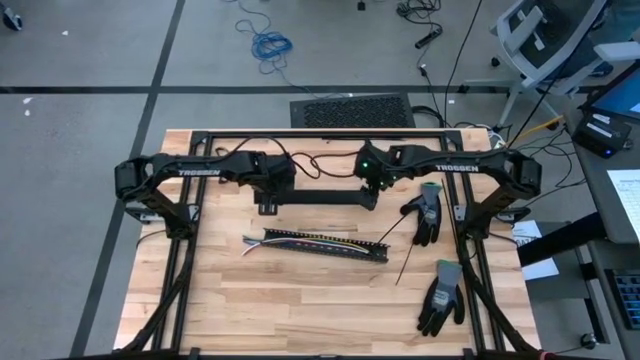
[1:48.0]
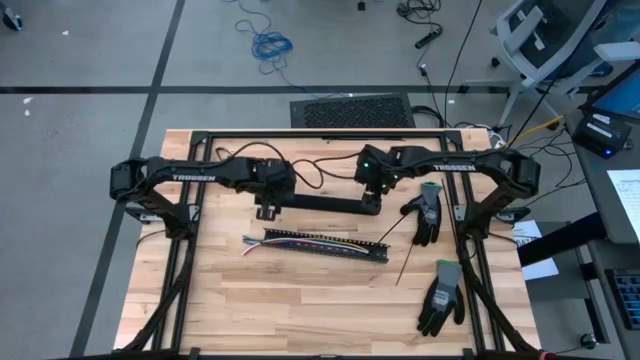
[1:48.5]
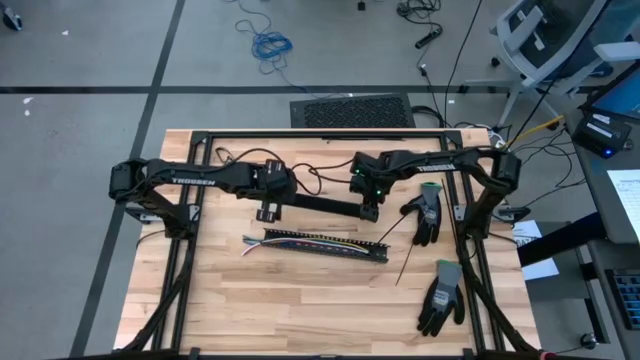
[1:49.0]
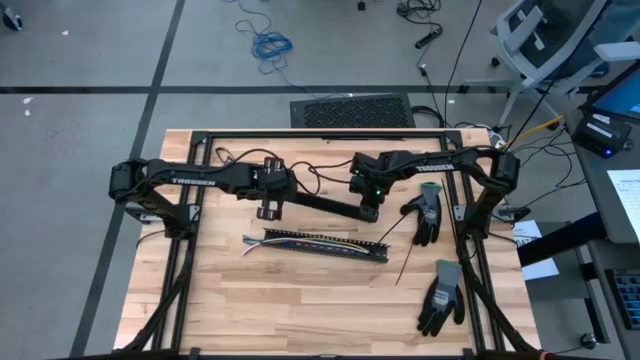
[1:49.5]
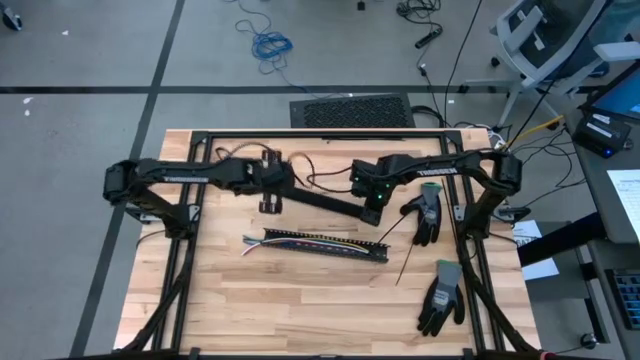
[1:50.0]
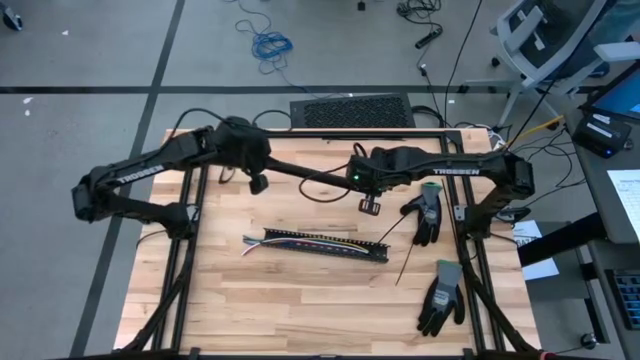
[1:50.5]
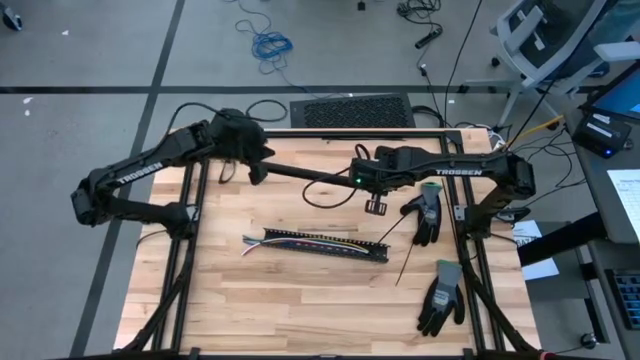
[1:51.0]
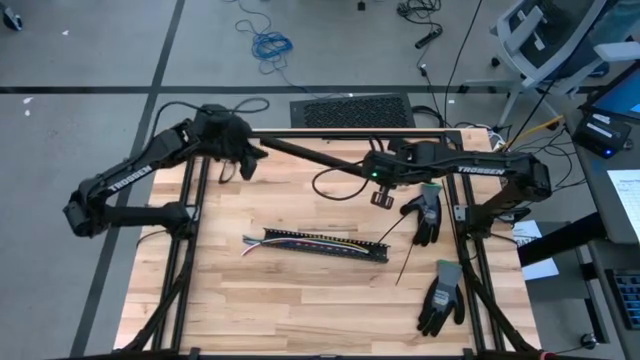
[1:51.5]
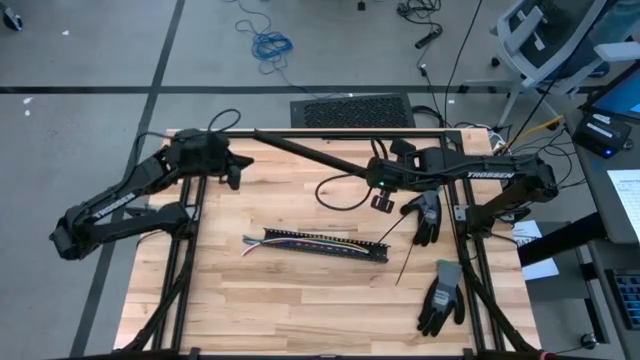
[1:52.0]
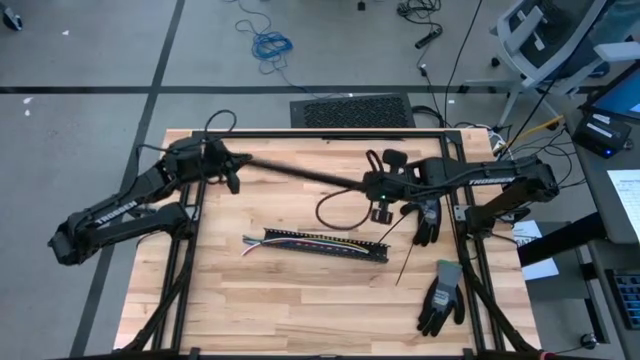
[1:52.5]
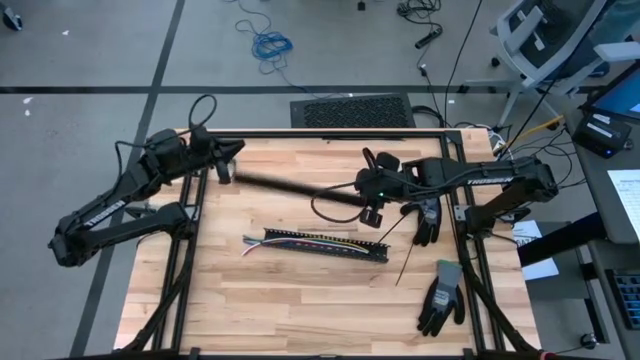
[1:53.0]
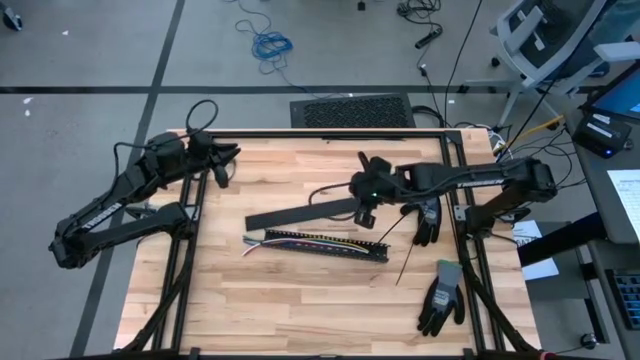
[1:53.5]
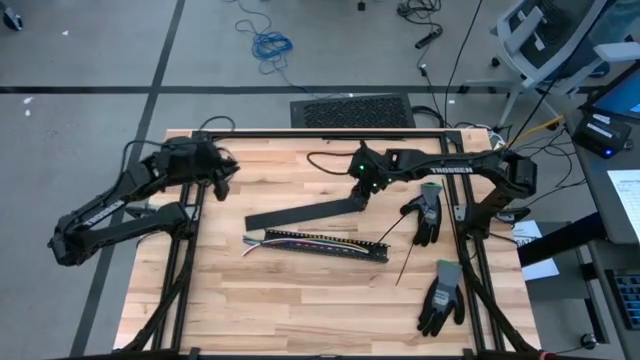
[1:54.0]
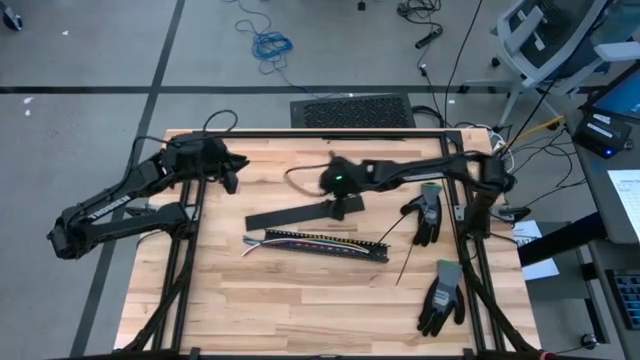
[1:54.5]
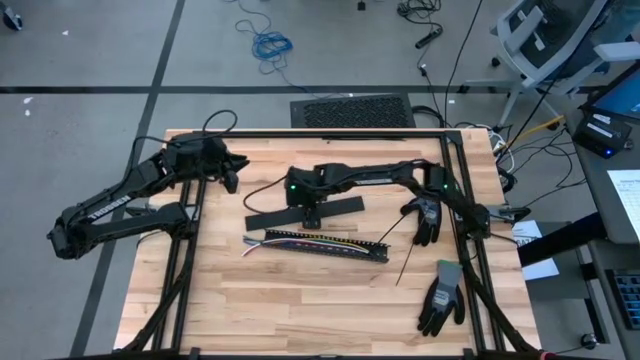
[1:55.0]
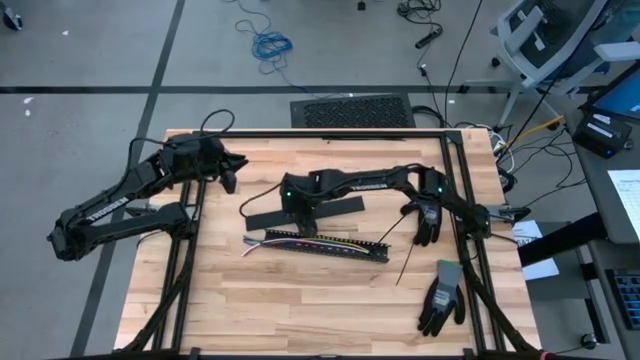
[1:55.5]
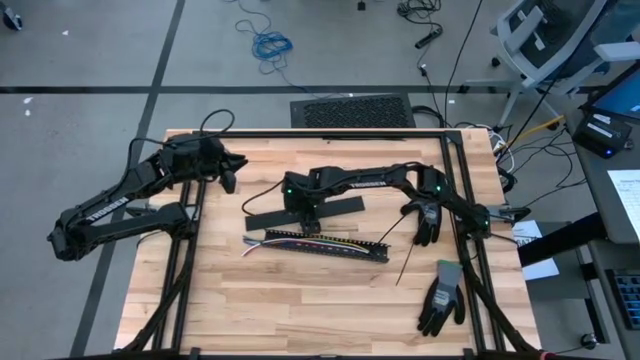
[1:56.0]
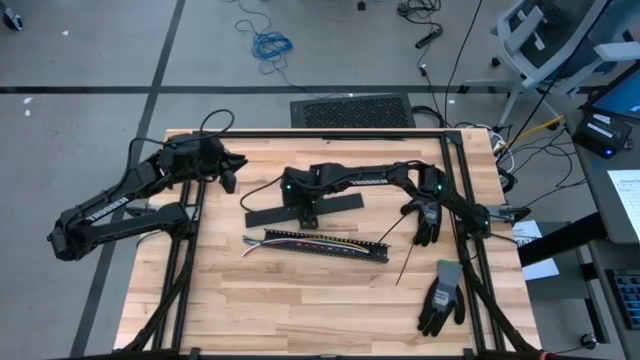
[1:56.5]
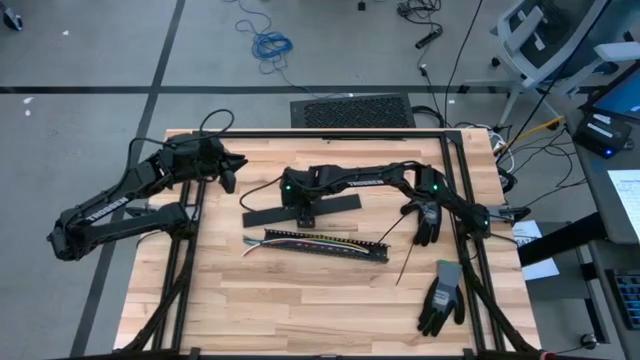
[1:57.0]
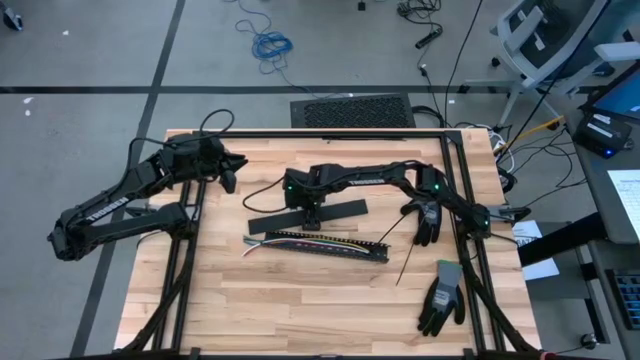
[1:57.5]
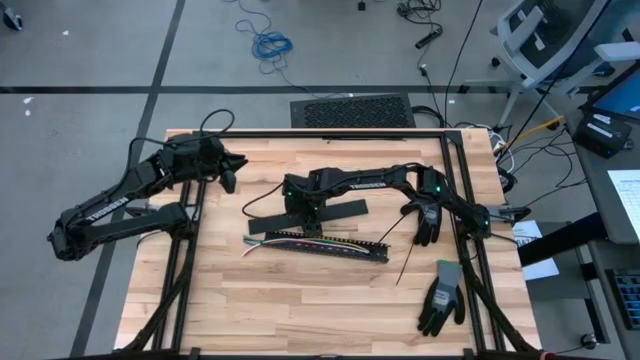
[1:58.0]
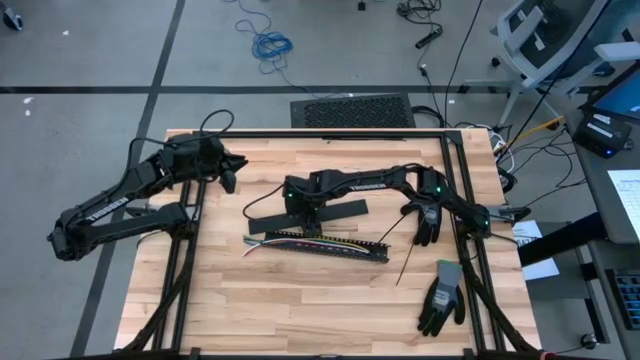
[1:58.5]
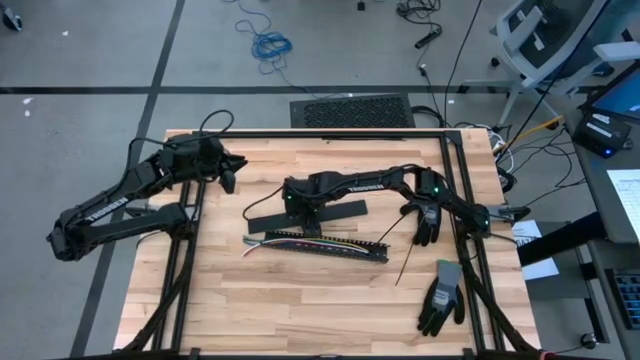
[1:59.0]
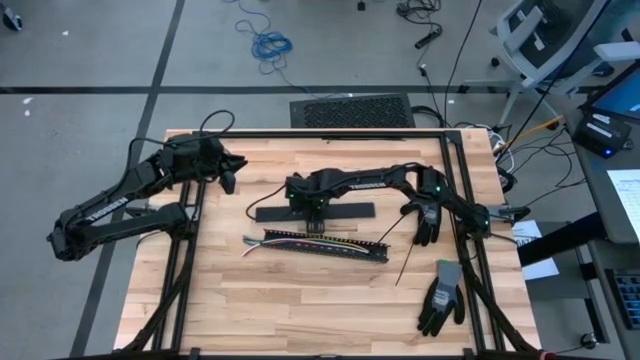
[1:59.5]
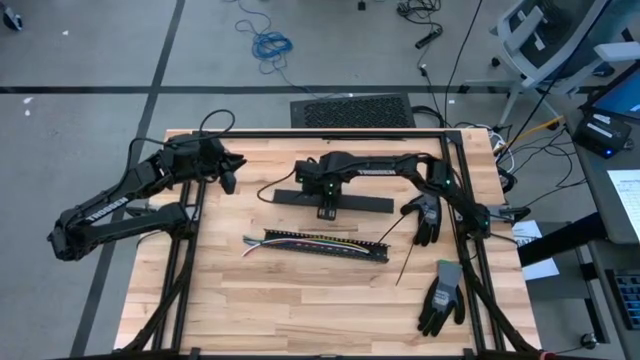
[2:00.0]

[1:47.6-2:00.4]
Task: Ziptie cables
Close the black cable duct cover

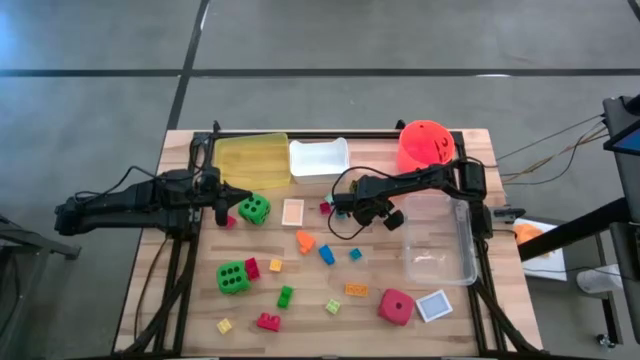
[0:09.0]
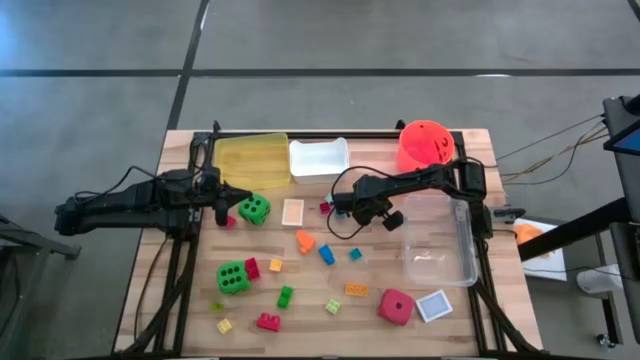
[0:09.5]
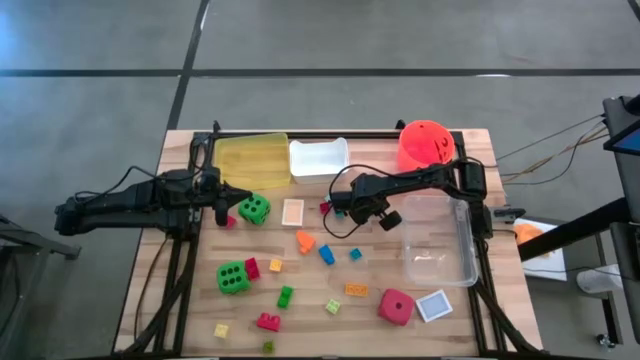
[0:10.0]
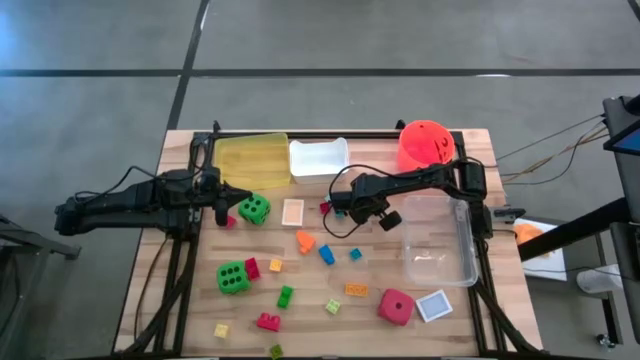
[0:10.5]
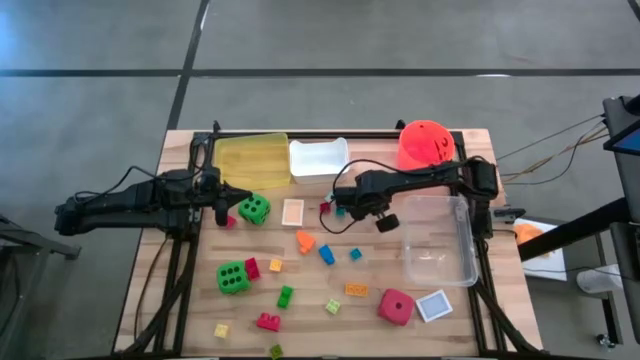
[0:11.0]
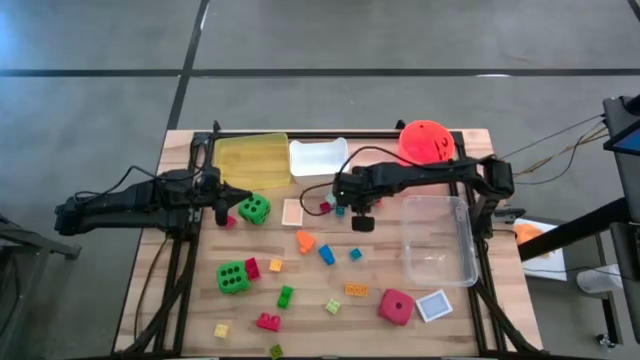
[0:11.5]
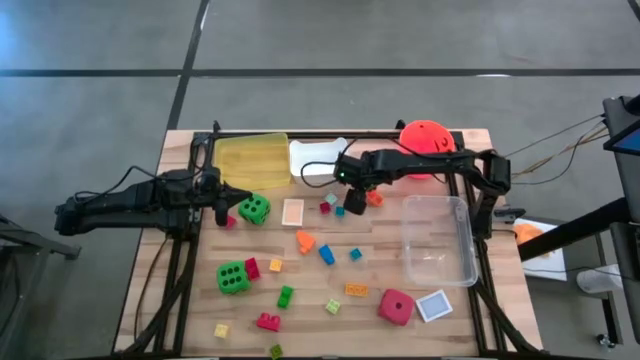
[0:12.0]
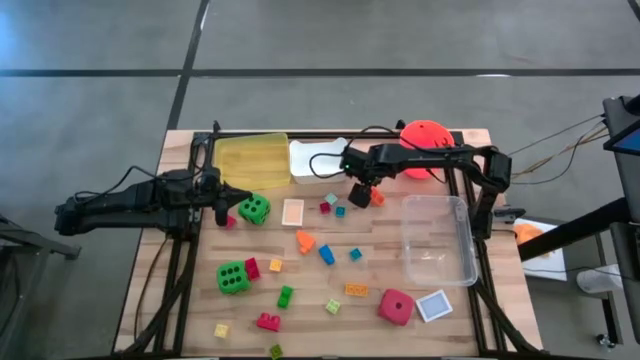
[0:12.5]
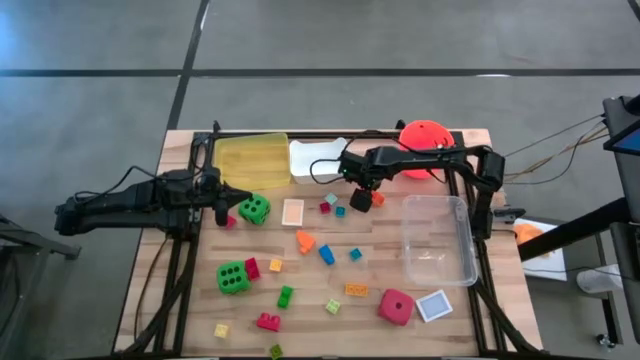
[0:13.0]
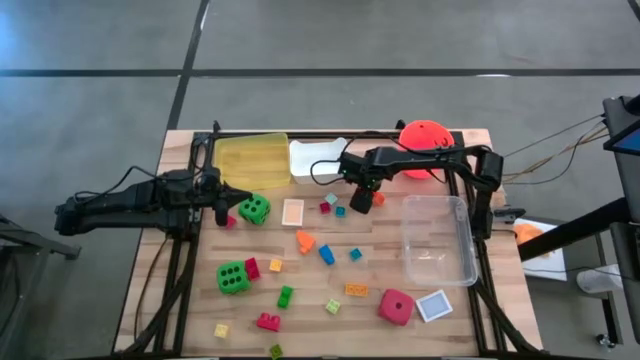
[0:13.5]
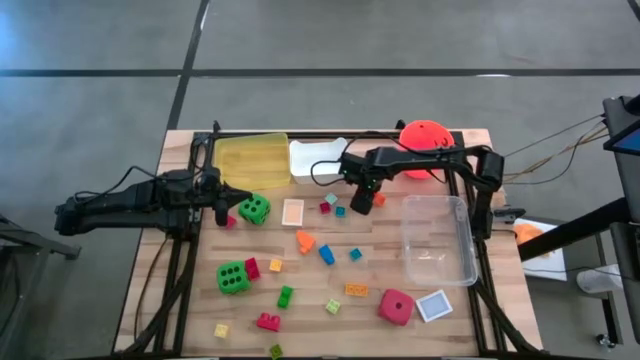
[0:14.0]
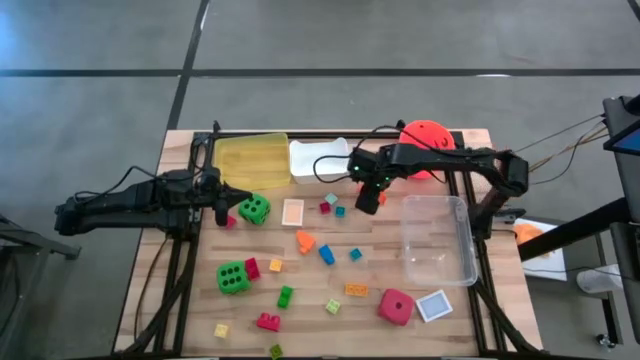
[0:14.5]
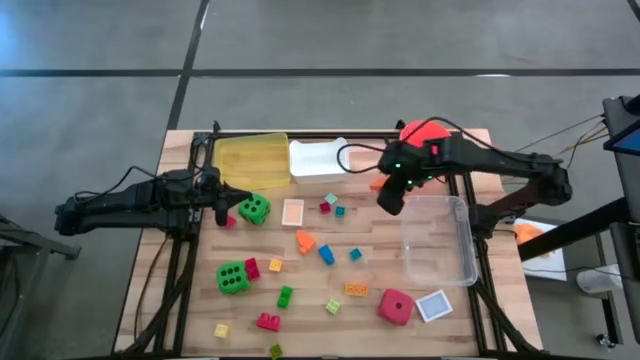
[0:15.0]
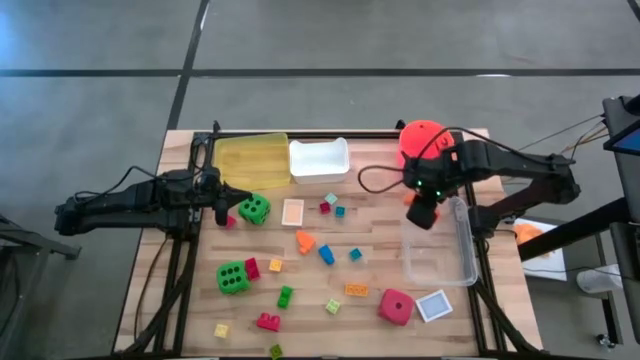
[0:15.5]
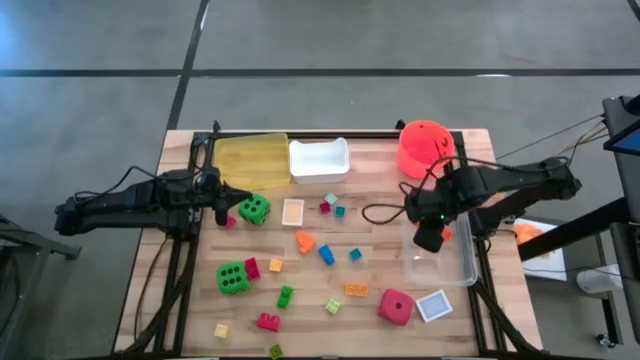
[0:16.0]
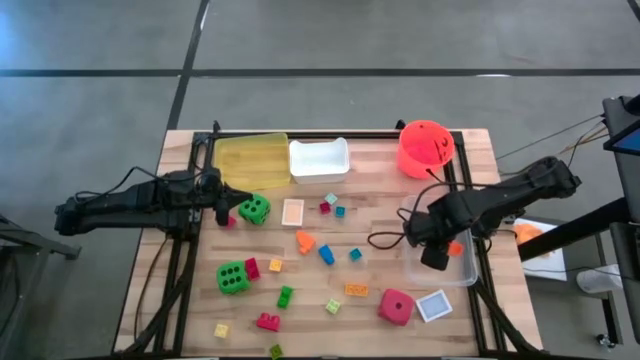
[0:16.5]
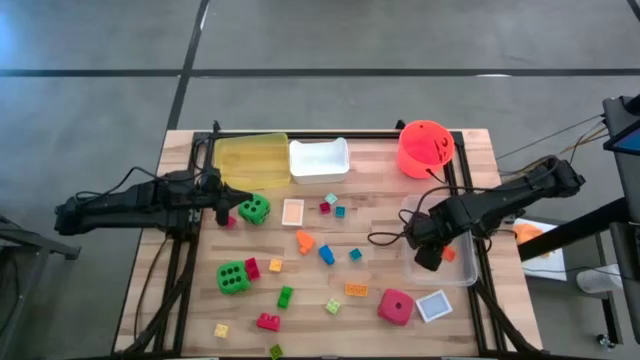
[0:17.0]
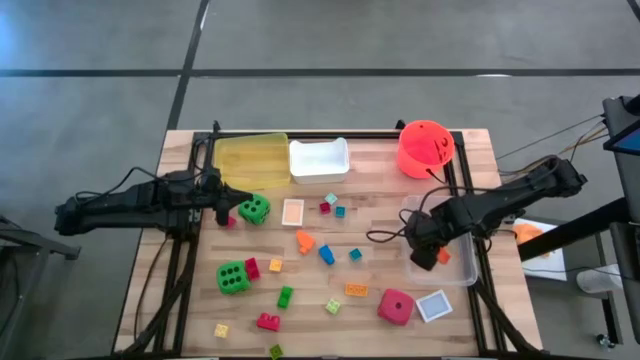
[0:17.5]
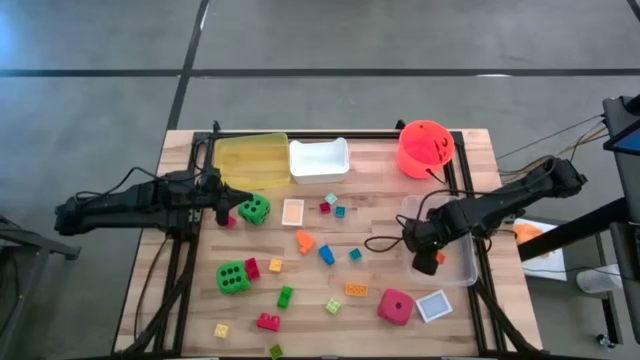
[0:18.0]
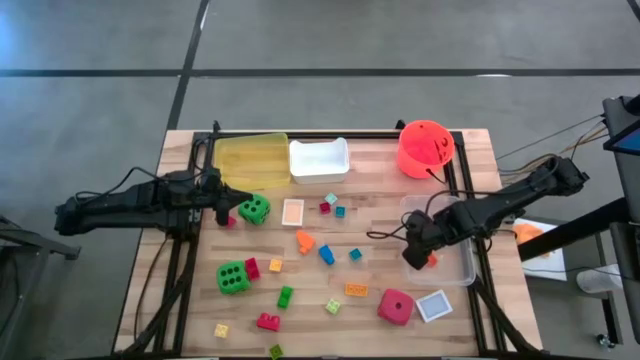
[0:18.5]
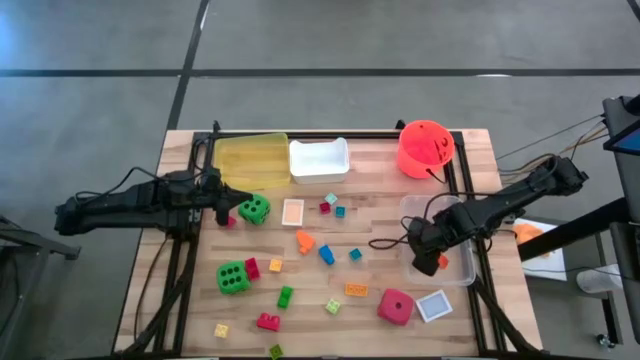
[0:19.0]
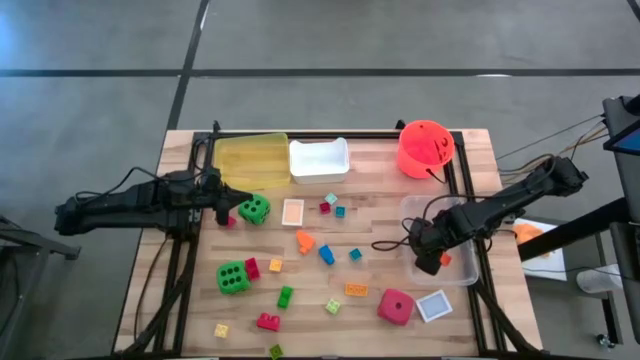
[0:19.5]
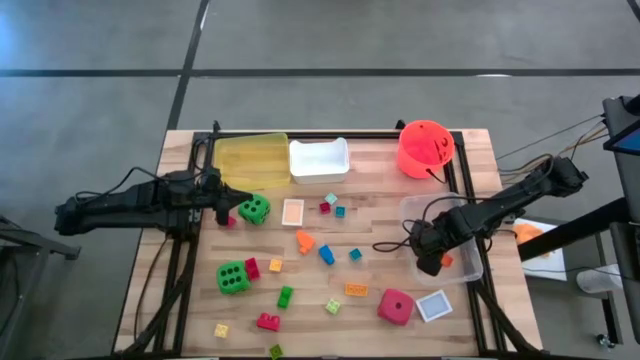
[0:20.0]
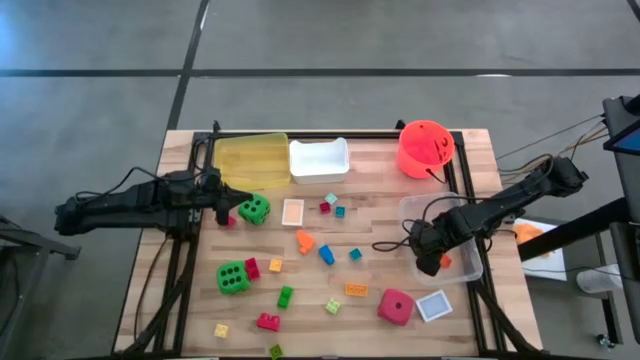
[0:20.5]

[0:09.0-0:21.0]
Task: Pick & Place Toys
Put the orange game piece into the transparent bin
